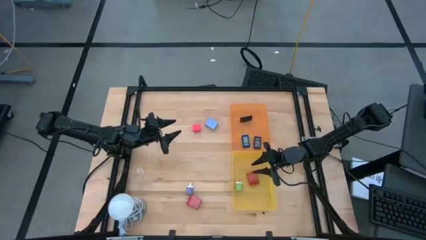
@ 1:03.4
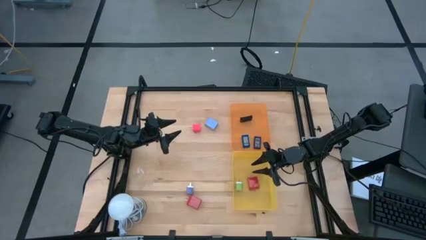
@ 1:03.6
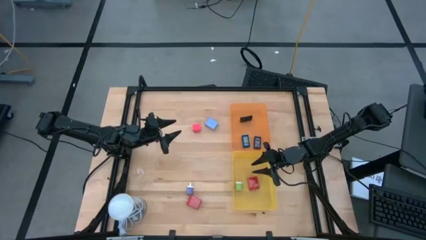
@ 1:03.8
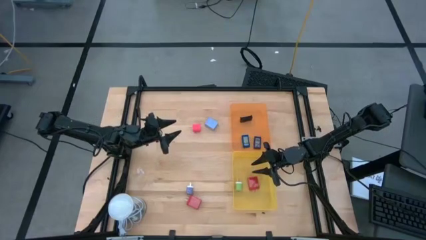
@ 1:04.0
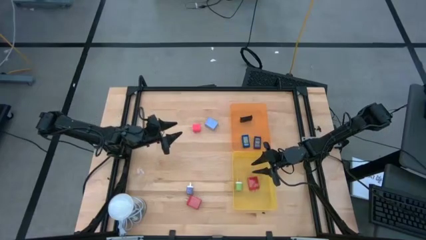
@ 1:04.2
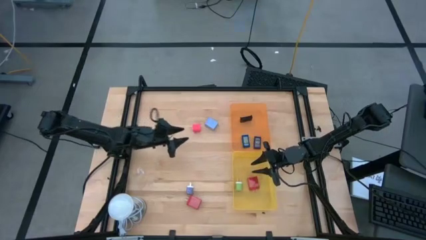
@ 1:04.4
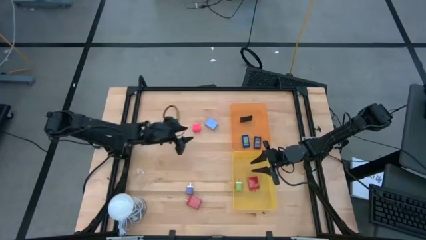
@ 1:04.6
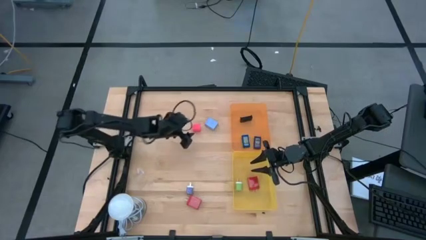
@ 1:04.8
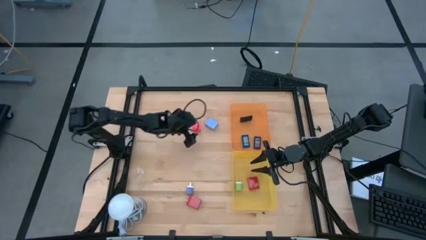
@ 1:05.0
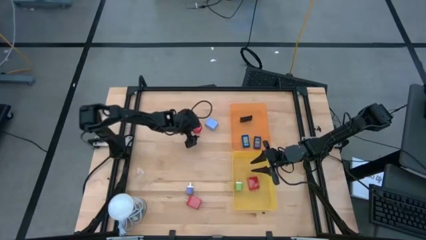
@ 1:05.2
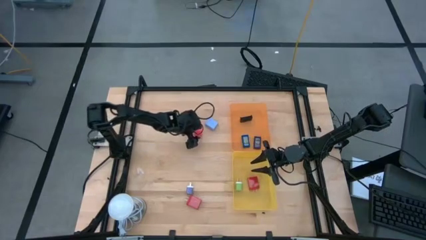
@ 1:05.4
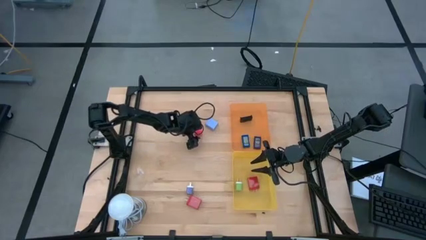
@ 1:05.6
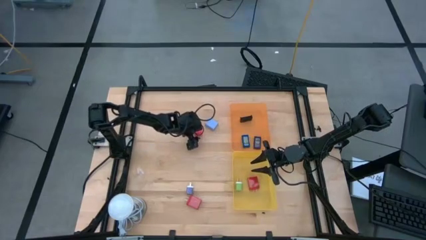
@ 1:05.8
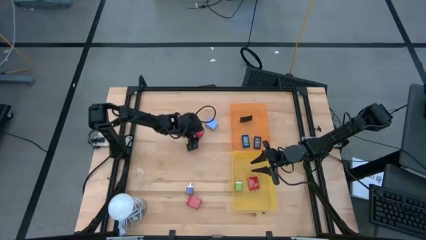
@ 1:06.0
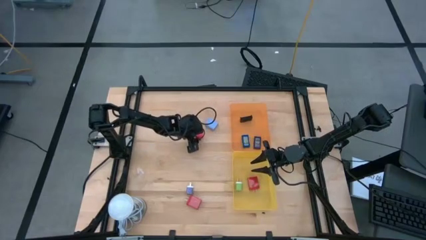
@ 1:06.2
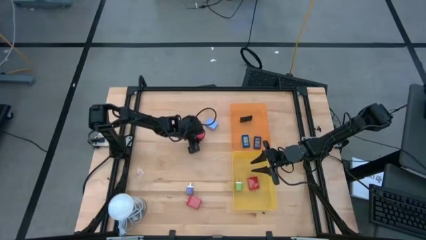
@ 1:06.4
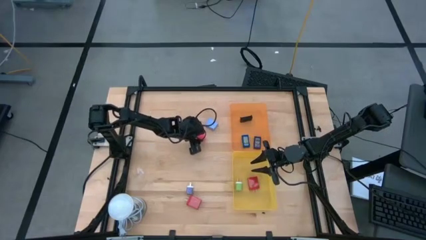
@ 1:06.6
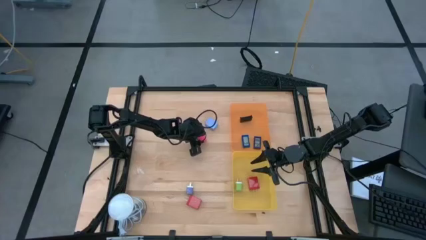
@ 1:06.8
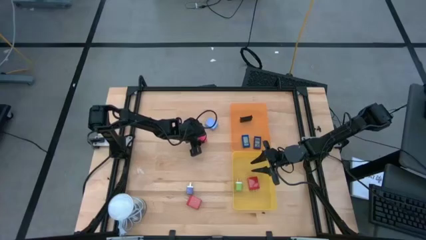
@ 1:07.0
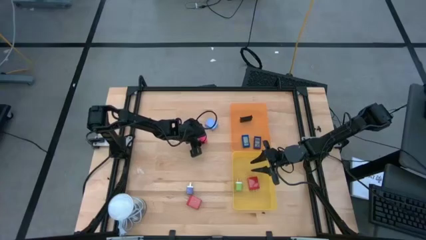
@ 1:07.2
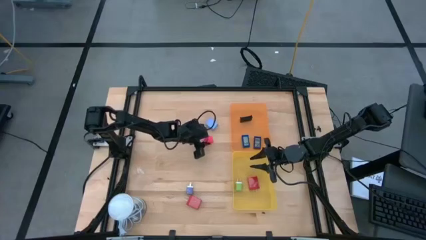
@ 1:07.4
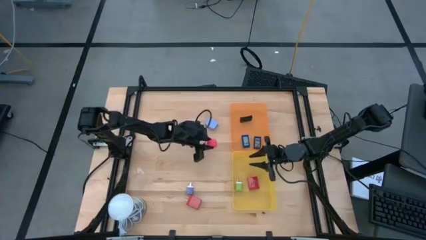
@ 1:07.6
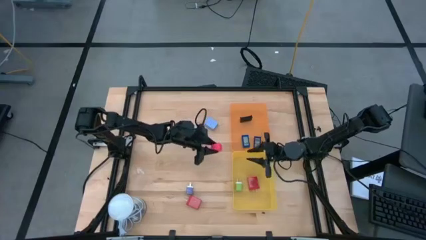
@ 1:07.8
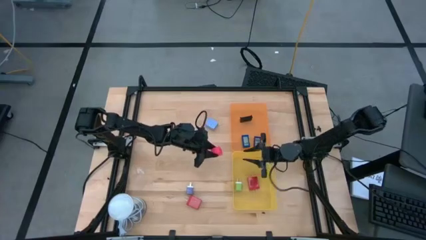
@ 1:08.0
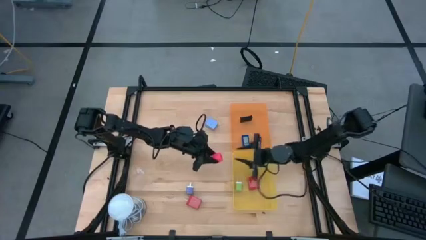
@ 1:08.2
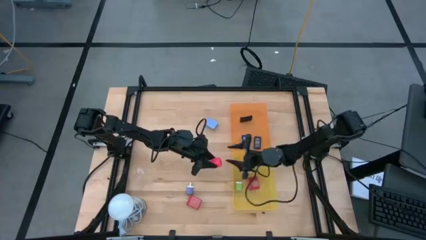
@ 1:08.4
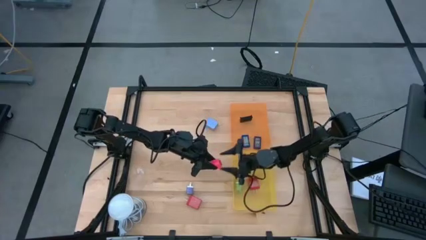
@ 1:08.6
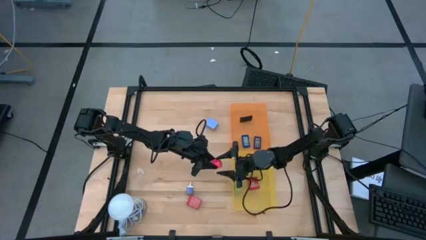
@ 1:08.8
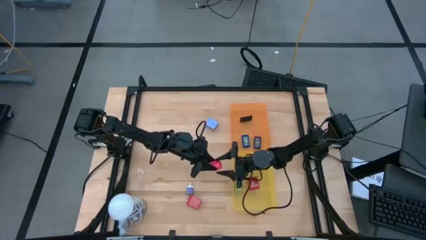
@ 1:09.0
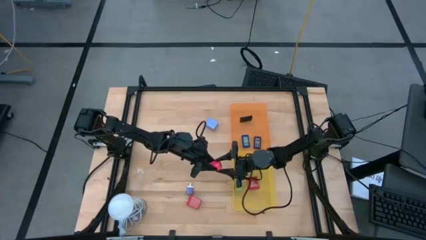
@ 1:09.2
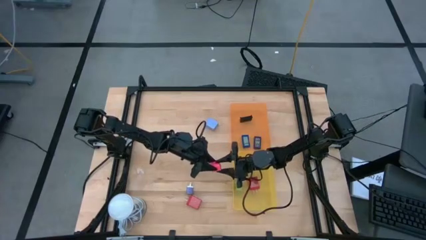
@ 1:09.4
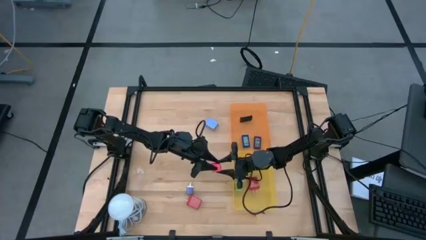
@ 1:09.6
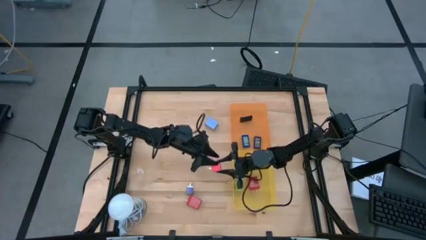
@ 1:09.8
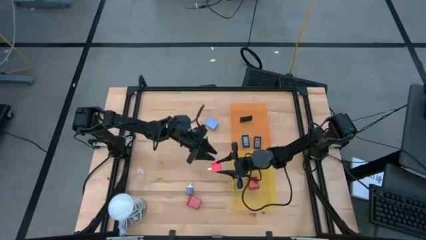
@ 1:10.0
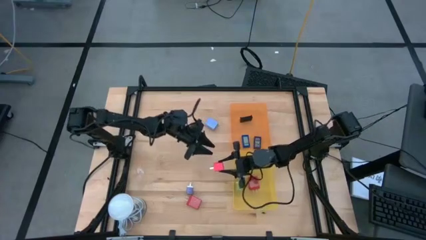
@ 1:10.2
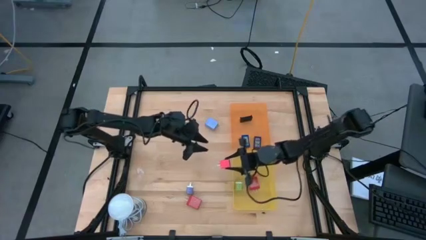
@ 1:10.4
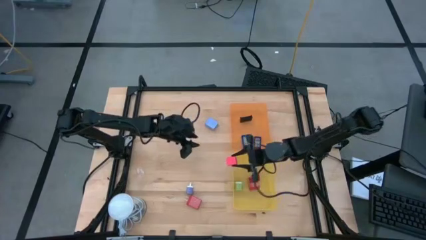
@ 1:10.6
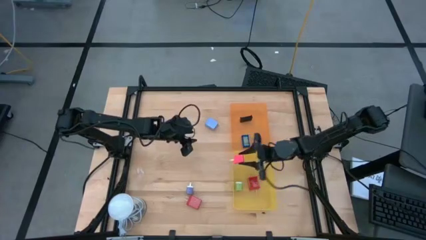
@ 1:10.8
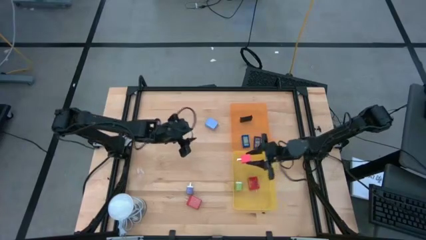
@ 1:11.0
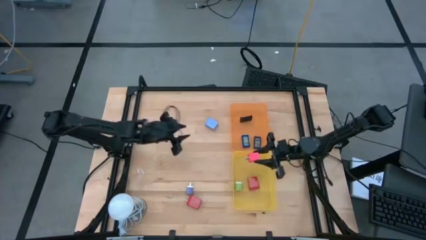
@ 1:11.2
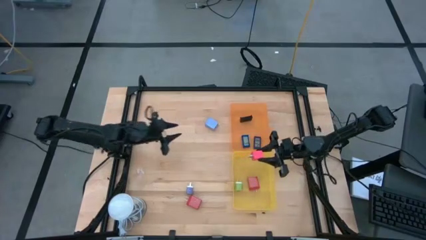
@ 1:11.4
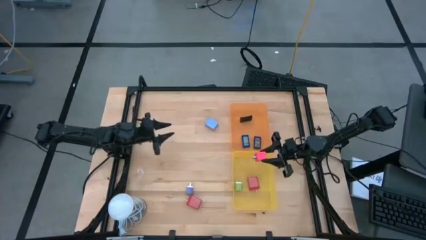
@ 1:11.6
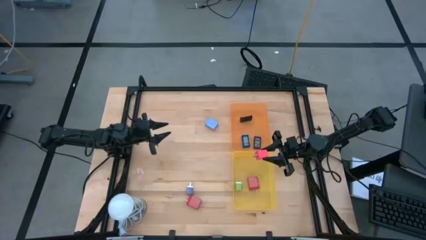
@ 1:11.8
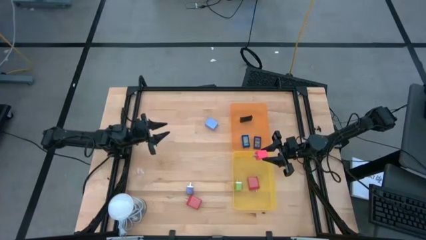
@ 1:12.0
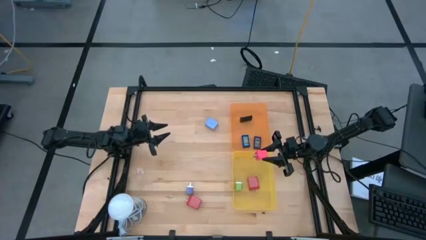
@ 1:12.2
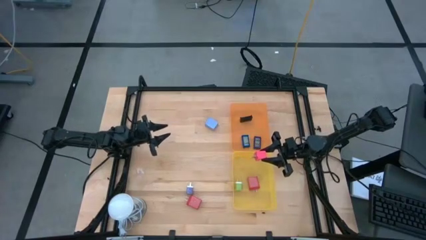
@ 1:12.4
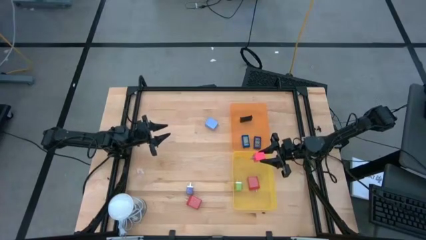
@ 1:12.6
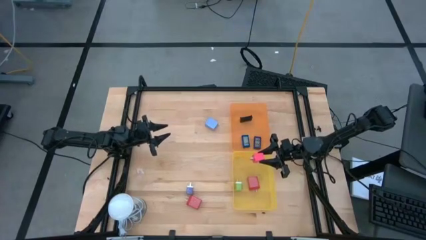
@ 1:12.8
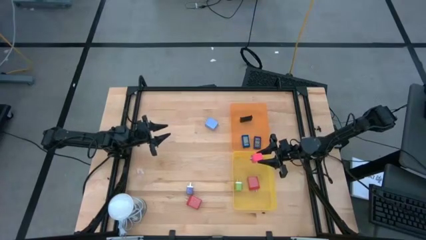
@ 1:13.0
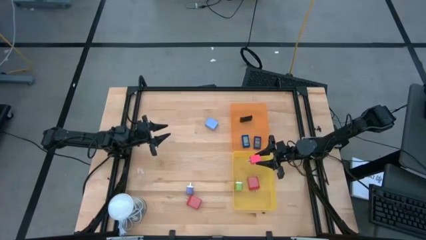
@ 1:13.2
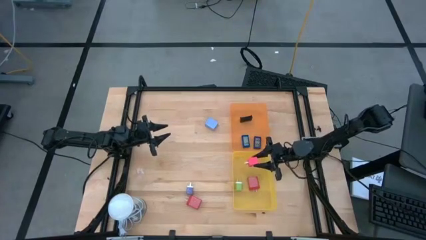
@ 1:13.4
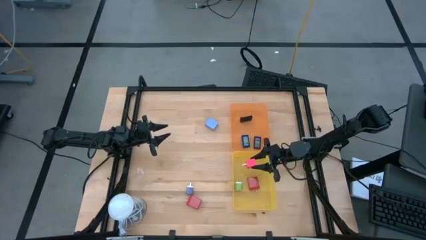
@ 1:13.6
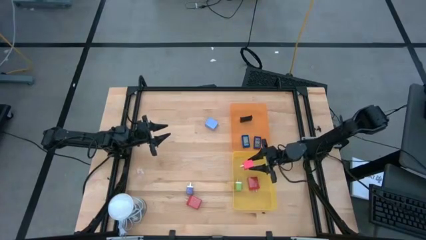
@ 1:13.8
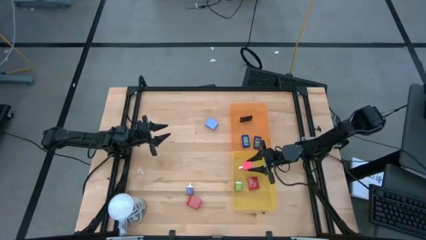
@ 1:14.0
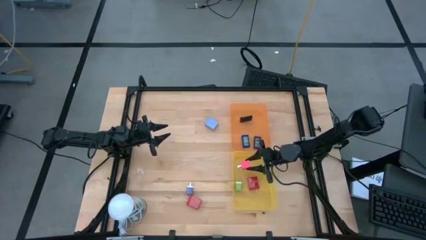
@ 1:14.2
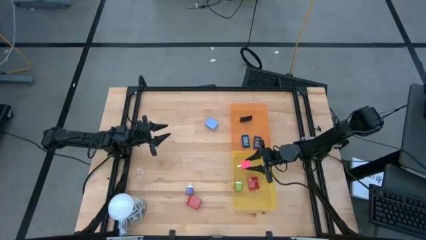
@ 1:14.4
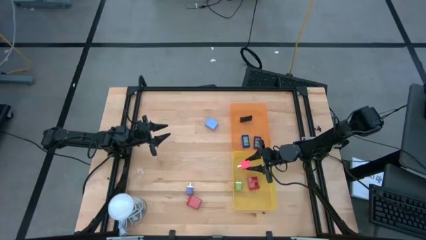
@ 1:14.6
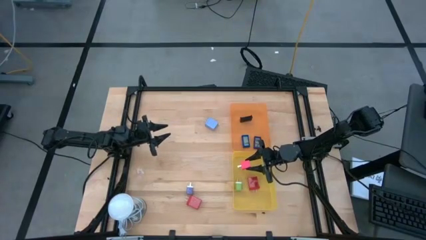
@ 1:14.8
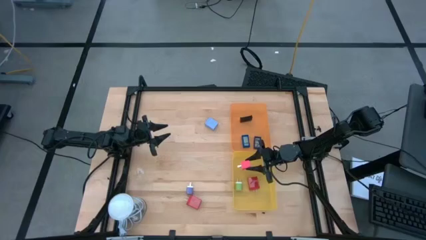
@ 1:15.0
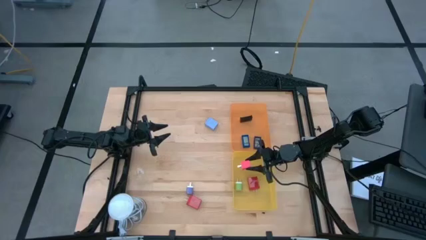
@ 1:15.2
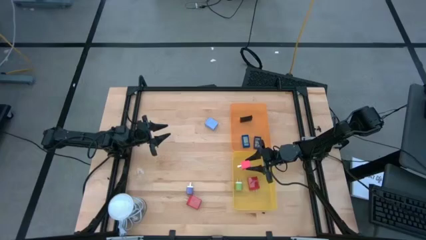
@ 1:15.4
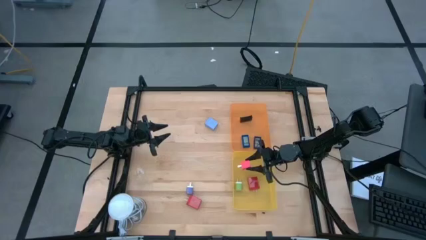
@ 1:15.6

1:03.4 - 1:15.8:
Task: Pick & Place Office items
Put the pink charger adapter into the yellow bin
